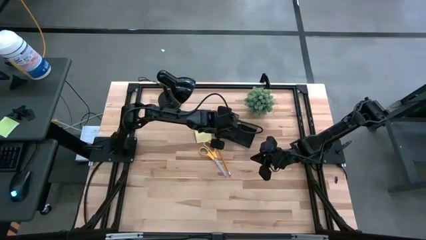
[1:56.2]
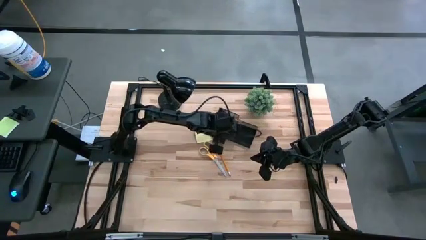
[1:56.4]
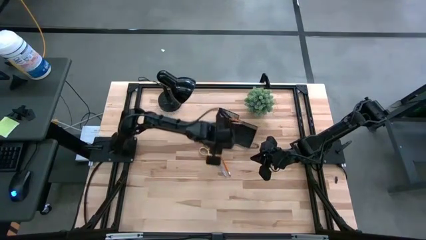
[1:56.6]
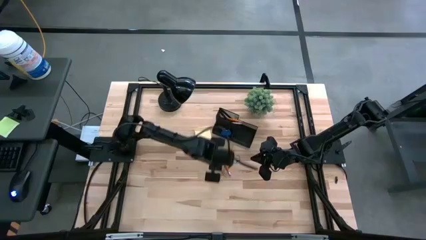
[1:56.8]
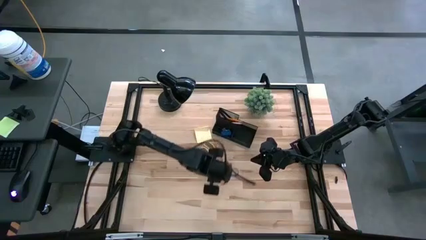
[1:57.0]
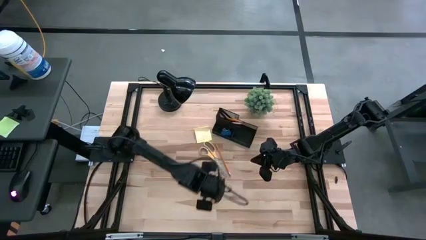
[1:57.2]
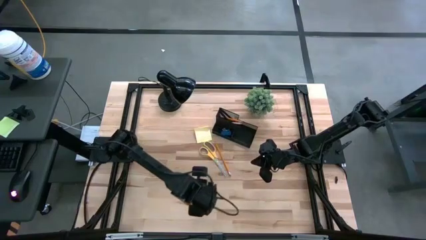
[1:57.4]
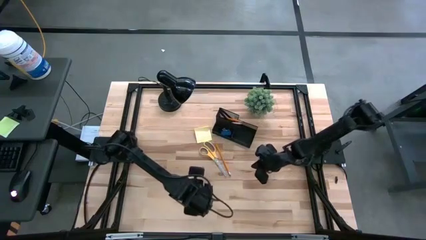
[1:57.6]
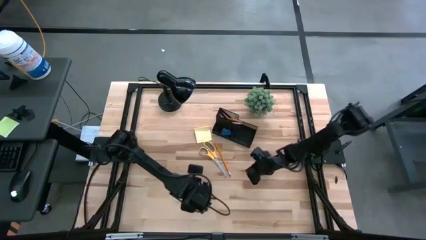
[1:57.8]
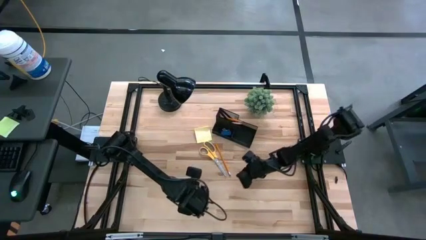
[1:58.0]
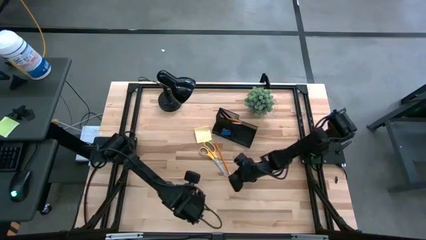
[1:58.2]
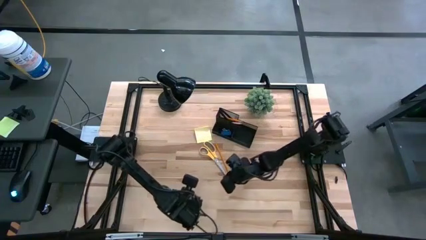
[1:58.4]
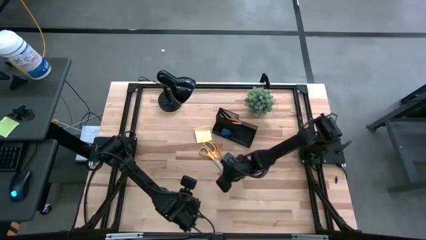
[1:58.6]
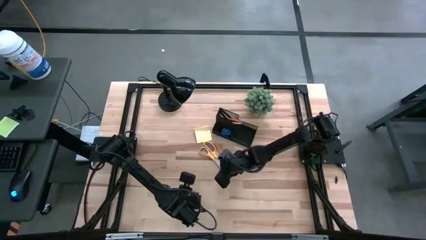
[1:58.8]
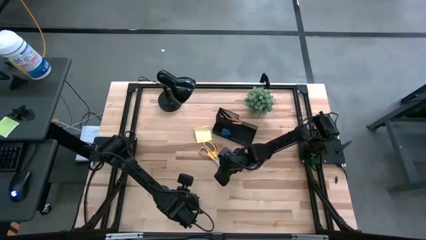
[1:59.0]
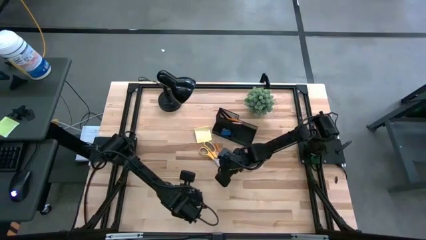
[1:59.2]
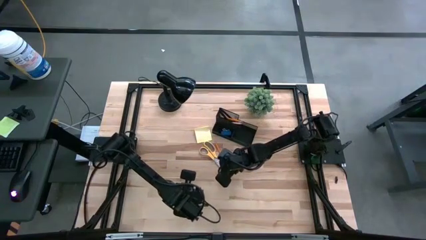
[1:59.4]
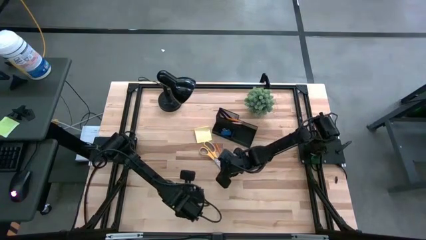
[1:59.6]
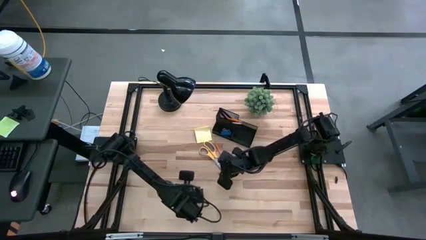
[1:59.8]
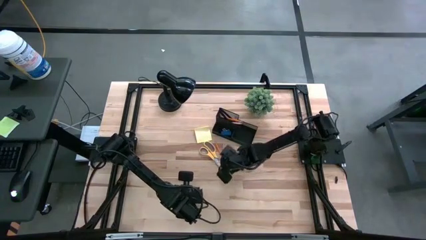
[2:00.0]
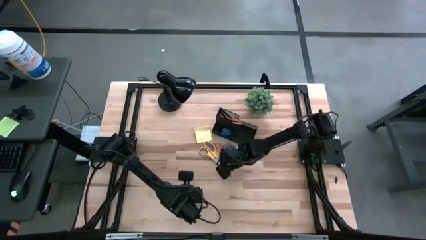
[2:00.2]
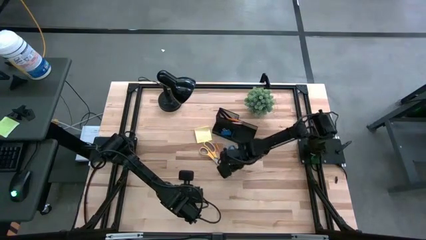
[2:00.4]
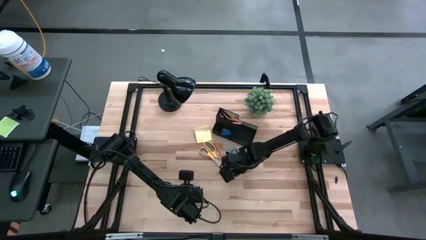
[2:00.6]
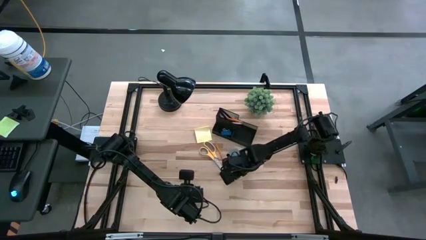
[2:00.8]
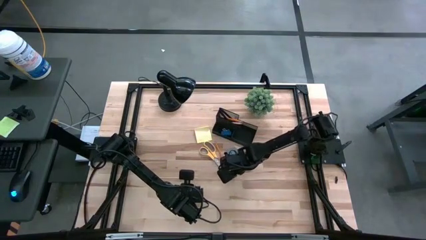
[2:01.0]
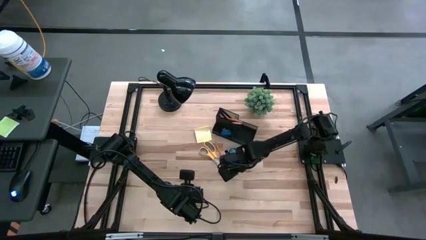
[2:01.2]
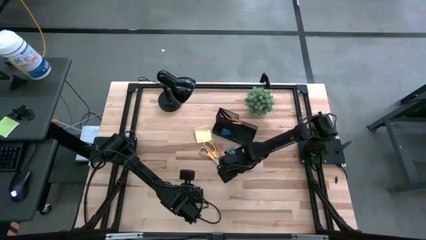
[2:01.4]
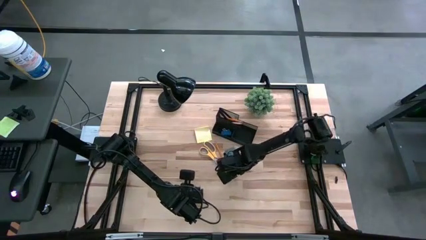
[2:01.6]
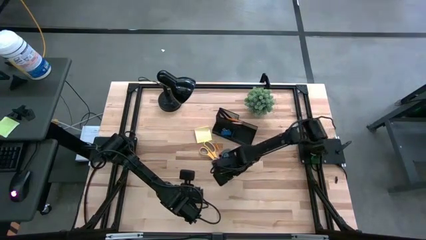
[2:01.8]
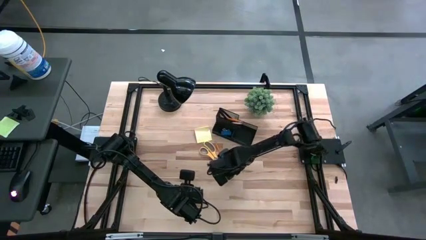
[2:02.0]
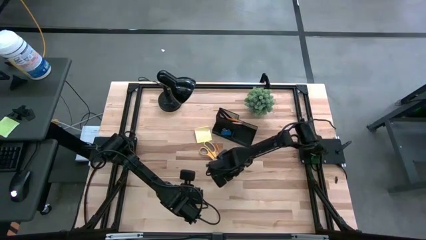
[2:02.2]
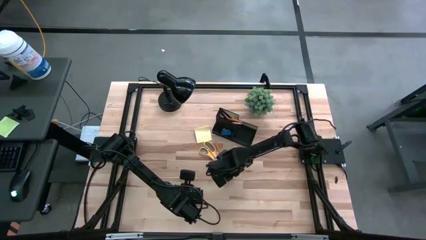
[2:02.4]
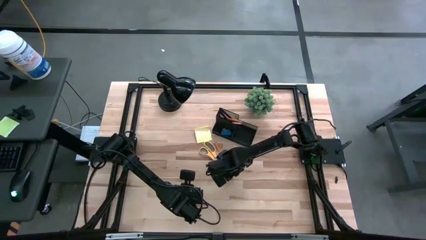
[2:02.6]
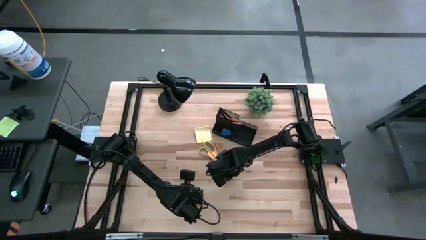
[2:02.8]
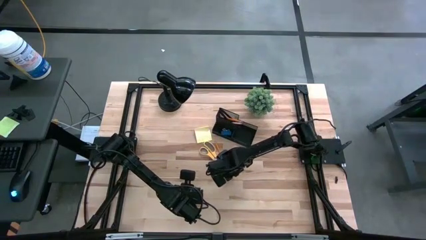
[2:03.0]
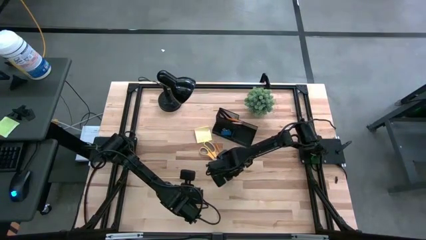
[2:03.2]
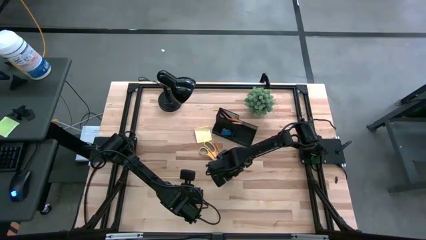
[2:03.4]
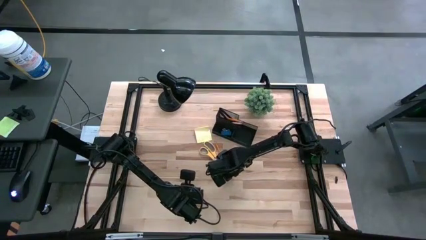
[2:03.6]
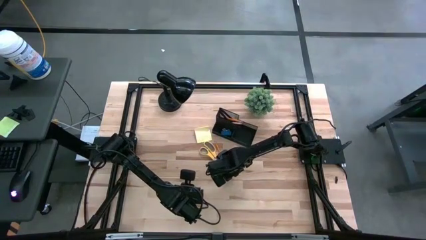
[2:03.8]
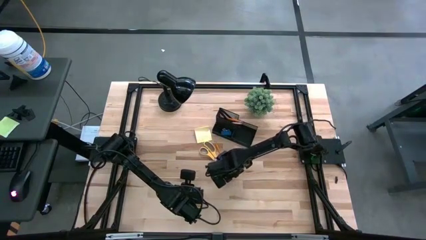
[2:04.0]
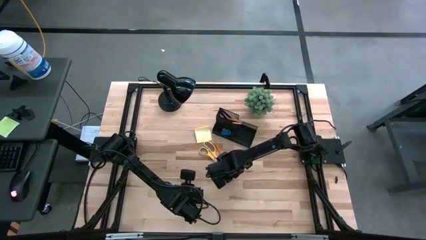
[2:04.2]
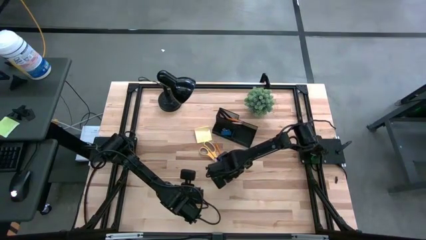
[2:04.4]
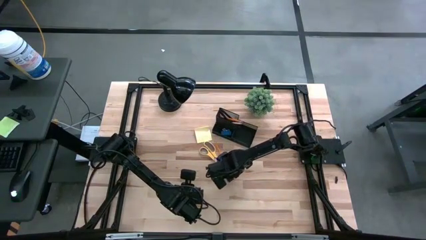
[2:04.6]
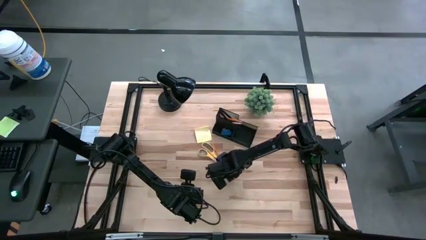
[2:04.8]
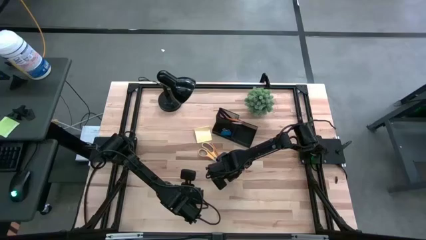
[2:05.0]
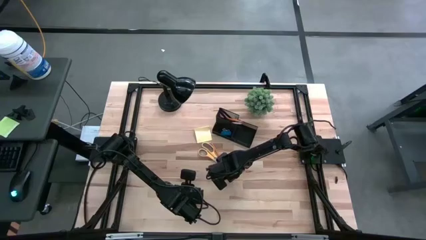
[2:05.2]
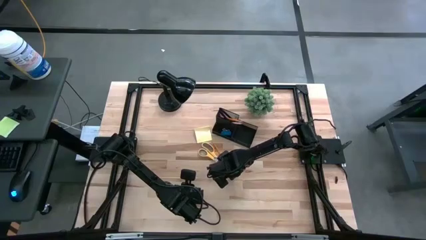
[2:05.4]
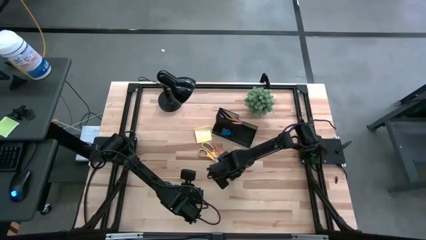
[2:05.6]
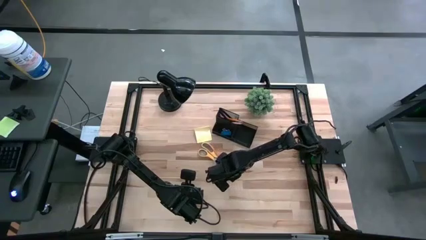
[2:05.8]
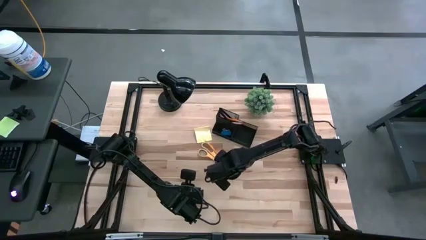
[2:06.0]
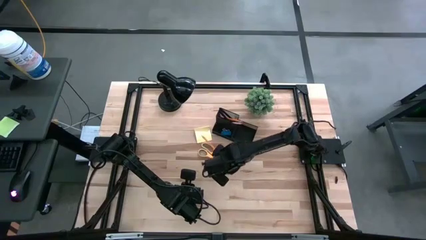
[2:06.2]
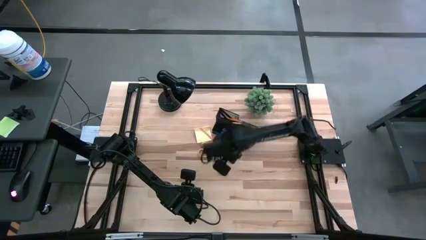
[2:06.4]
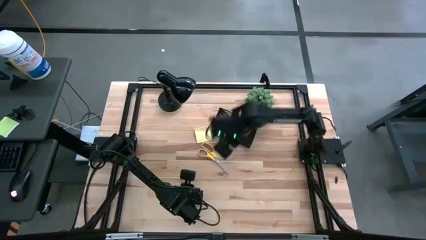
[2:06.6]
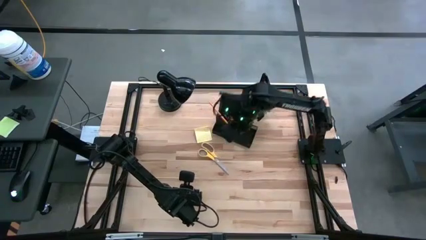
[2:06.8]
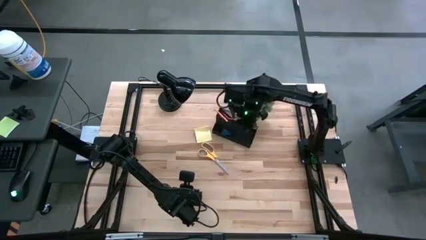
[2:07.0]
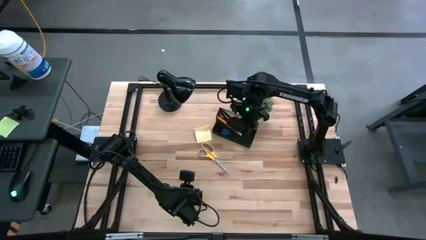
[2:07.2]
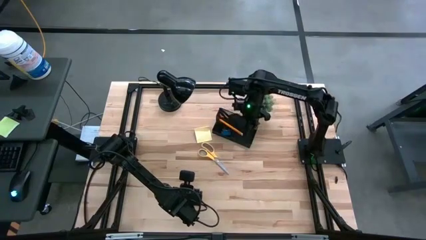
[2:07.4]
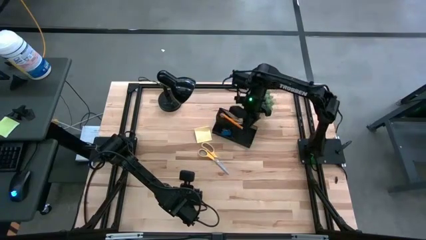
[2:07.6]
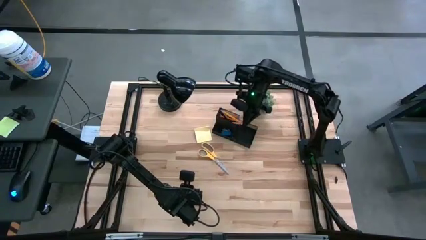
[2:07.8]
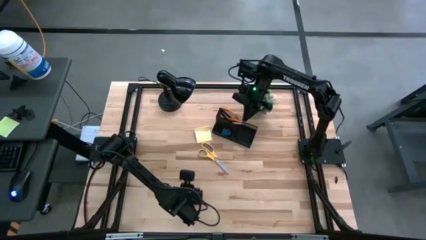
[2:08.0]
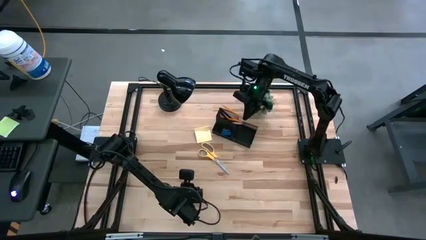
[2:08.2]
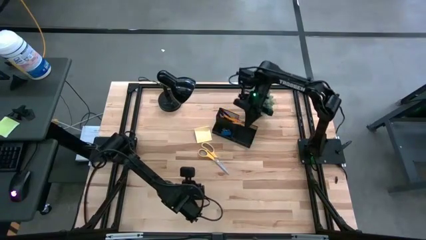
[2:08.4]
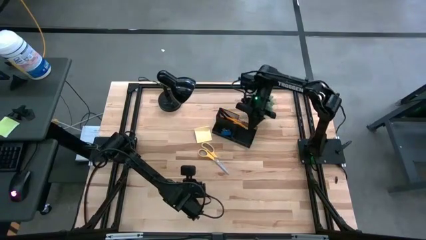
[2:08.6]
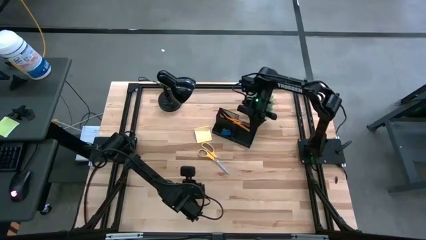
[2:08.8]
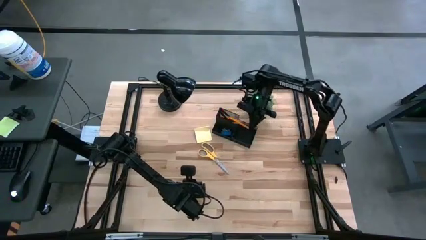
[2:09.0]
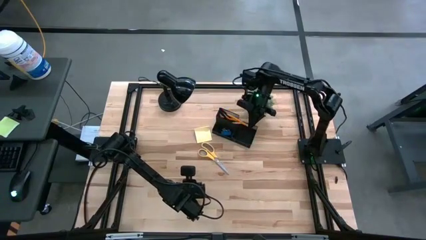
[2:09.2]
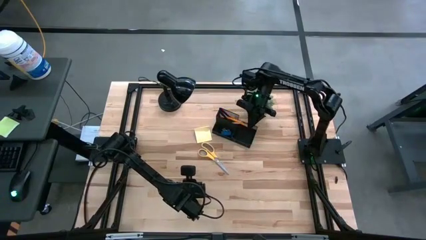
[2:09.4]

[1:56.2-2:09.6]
Task: Pick and place office supplies into organizer
Put the yellow pencil into the desk organizer
